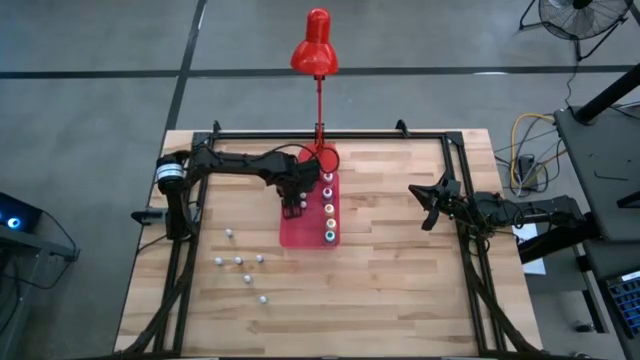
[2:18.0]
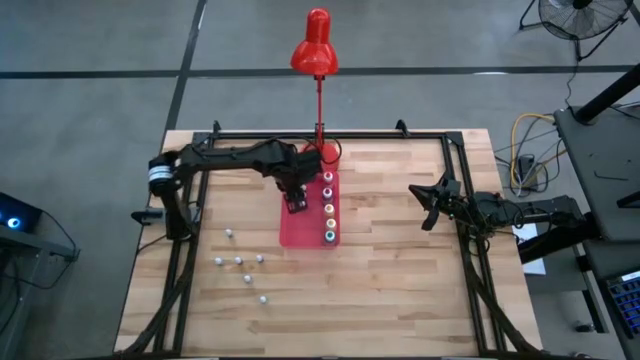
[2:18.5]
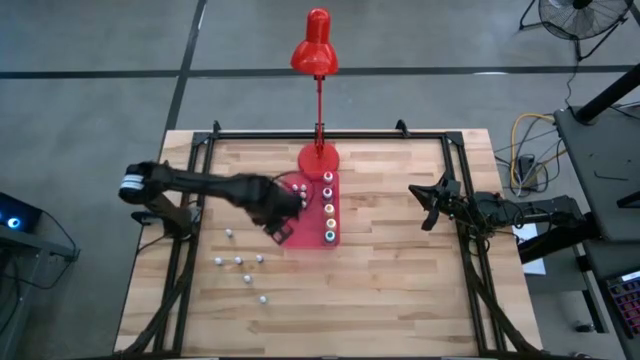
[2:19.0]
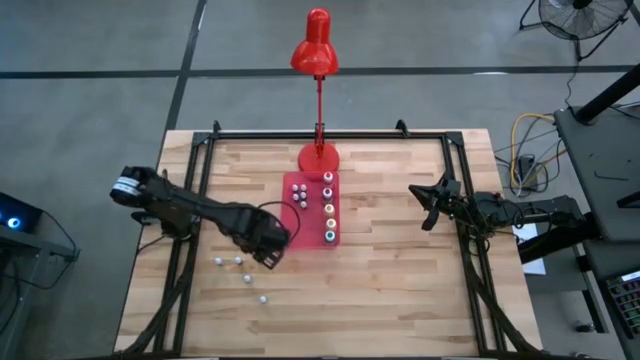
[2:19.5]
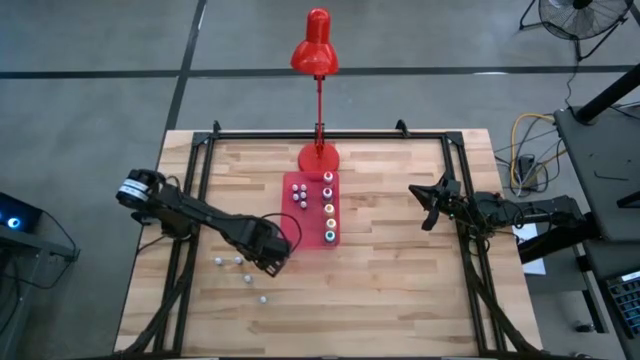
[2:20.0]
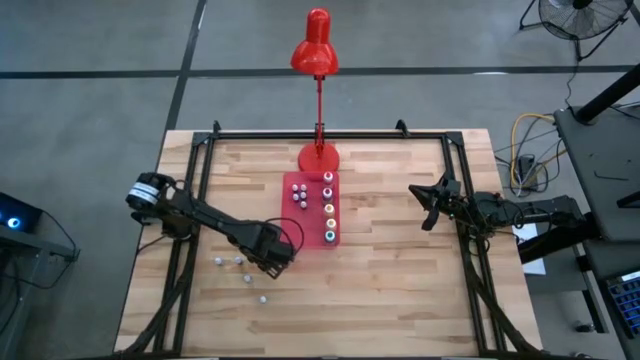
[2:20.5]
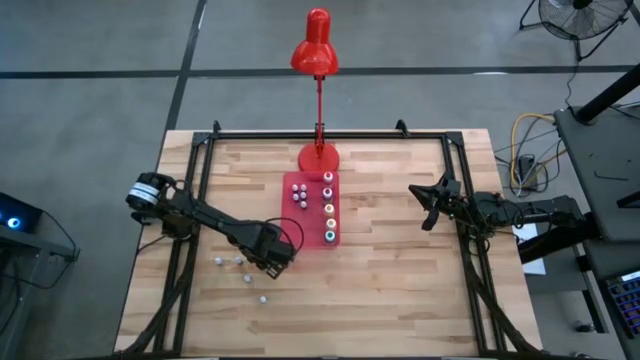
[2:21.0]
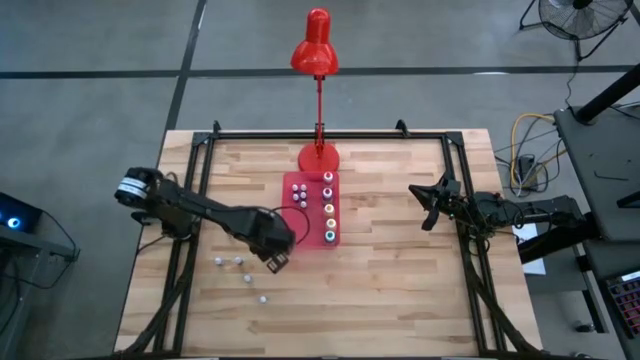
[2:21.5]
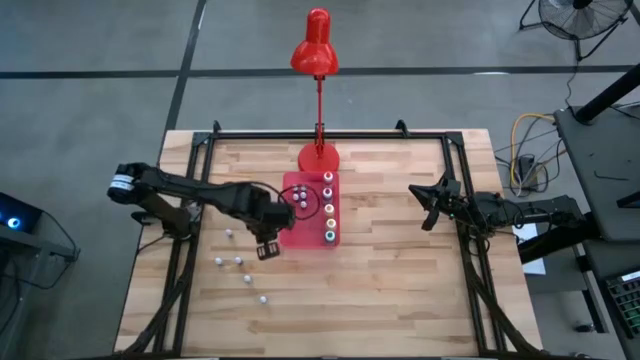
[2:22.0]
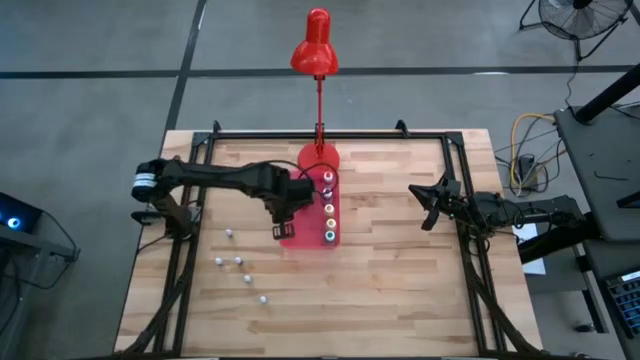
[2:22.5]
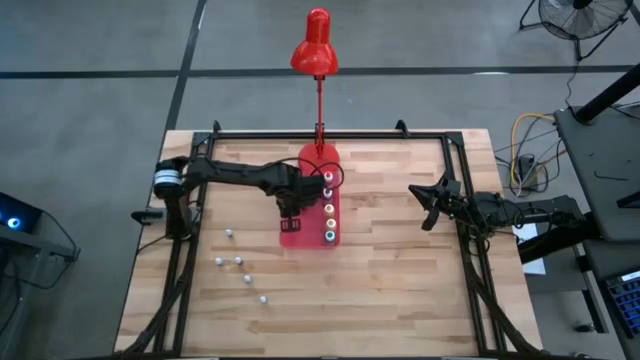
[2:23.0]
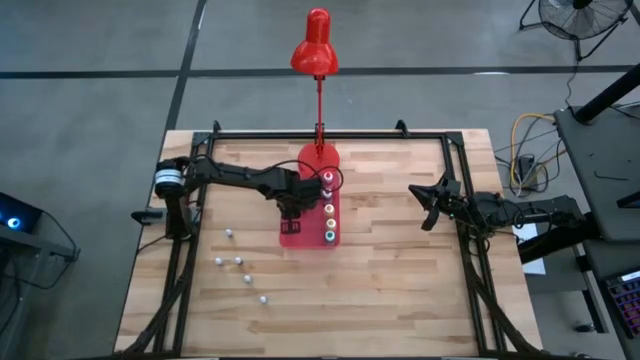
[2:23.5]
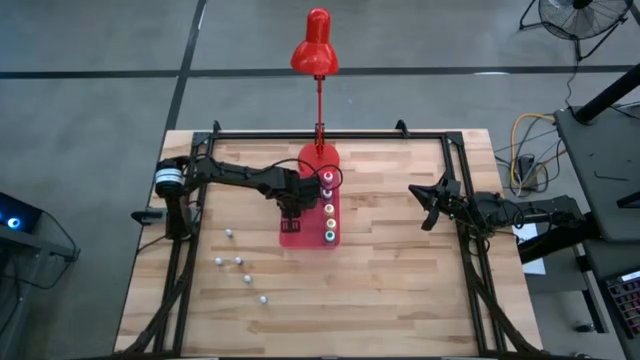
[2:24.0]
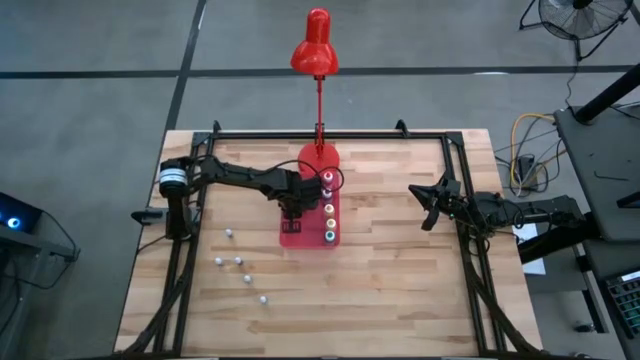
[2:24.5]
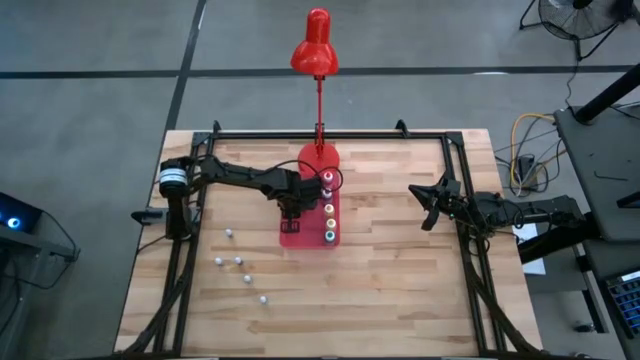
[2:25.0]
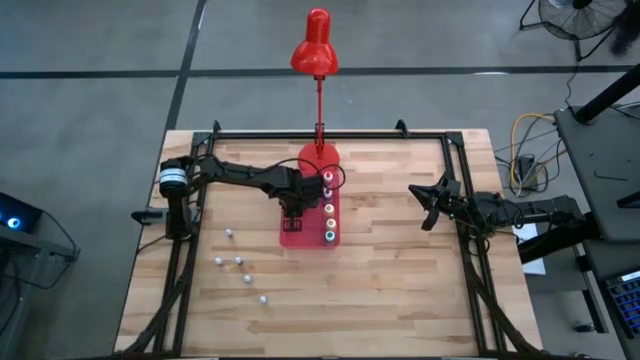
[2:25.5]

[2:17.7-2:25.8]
Task: Pick & Place food coloring
Put the small red food coloring bottle into the pink bin

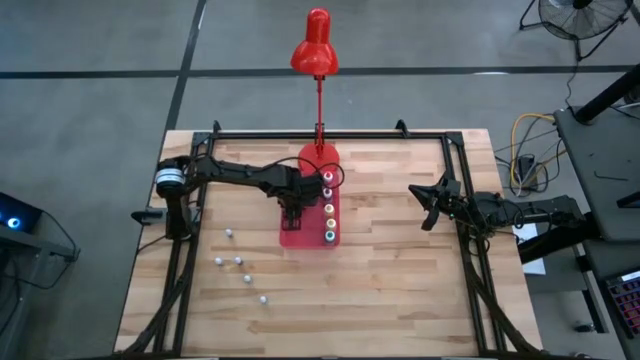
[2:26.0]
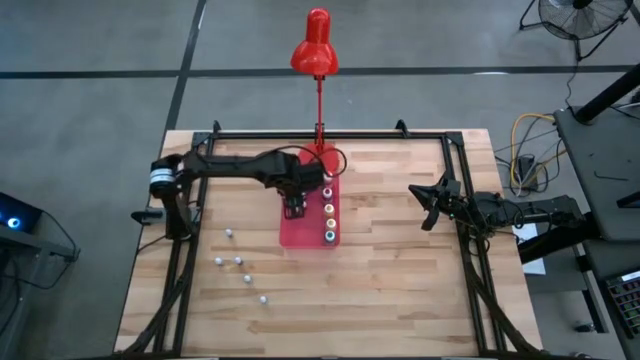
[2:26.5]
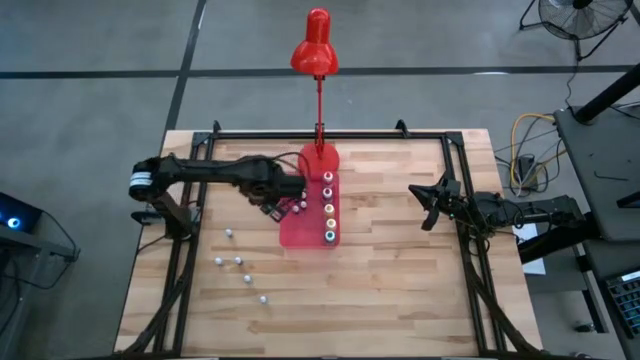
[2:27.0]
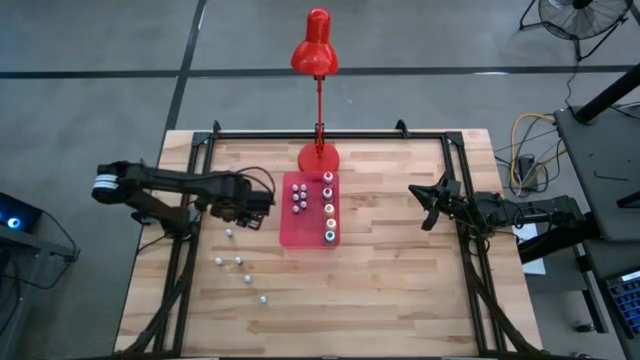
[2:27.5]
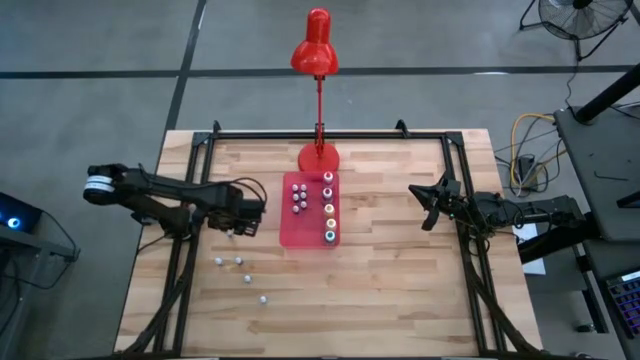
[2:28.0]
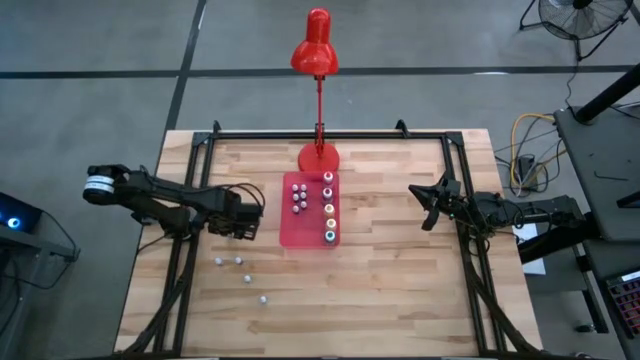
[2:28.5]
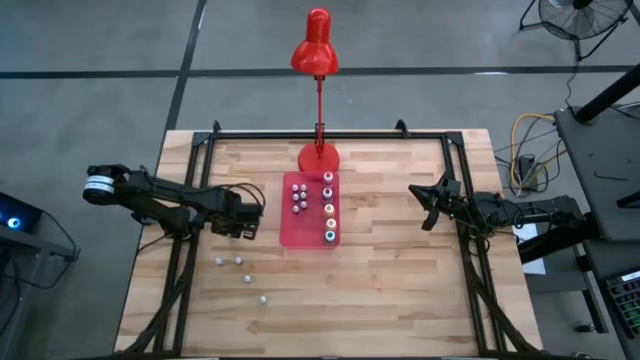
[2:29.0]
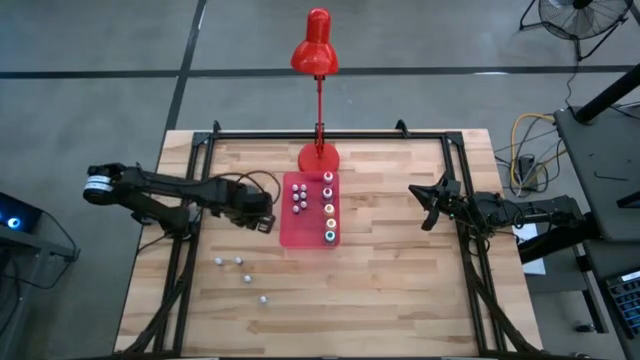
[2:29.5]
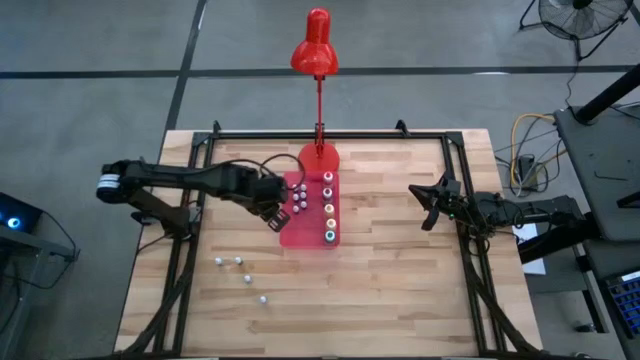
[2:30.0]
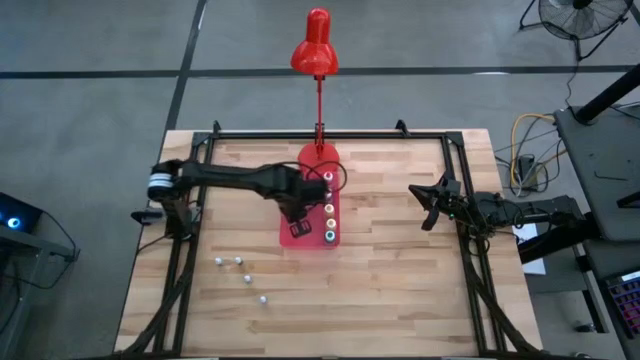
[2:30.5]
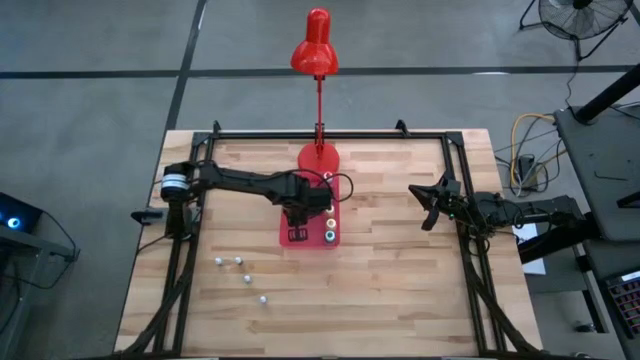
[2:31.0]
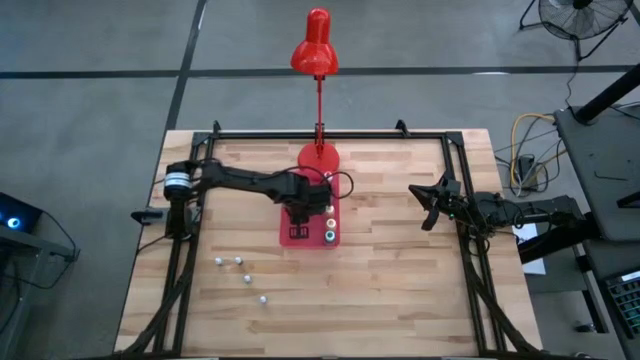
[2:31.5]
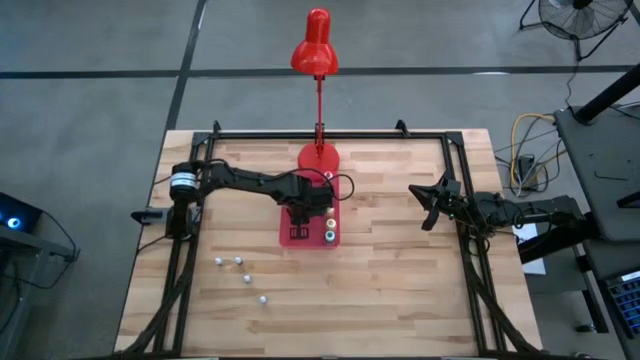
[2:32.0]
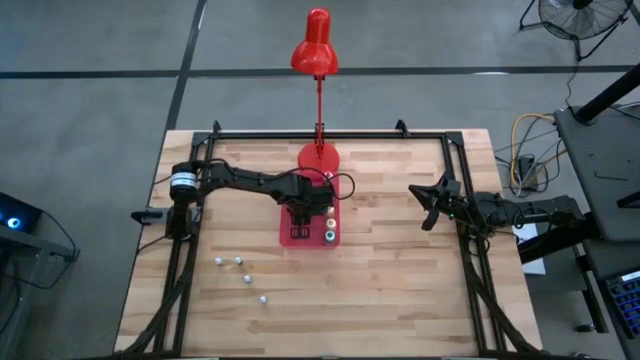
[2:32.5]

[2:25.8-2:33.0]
Put the small black food coloring bottle into the pink bin

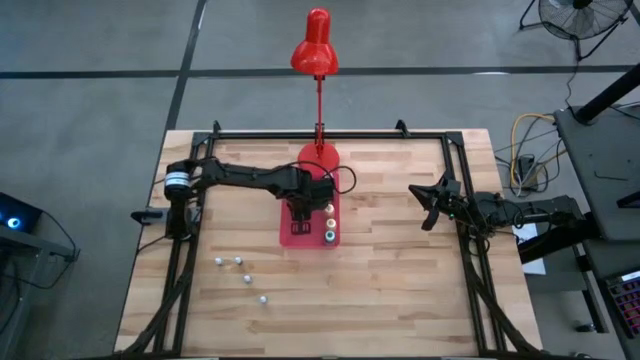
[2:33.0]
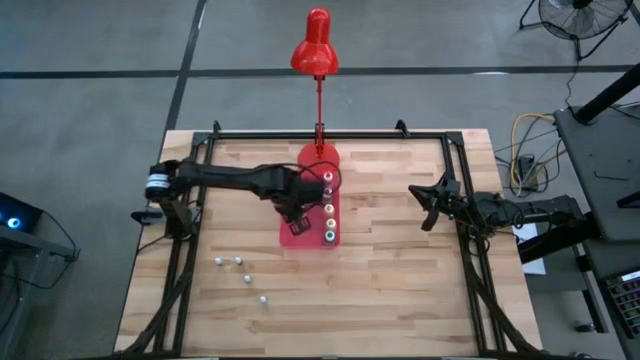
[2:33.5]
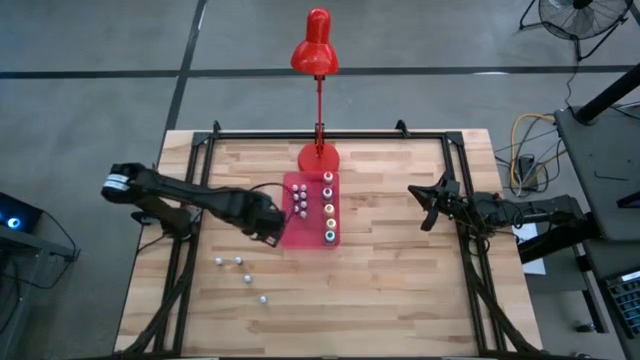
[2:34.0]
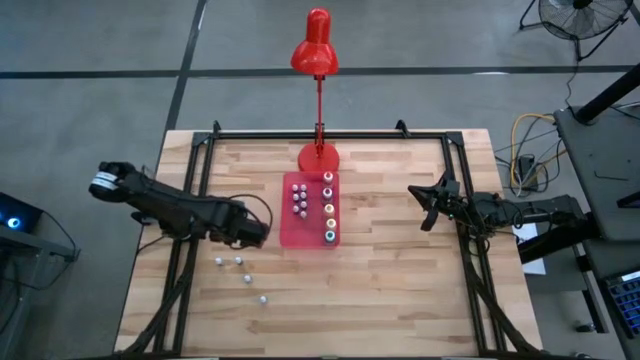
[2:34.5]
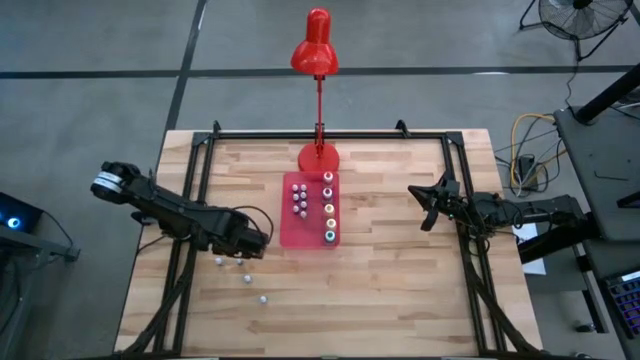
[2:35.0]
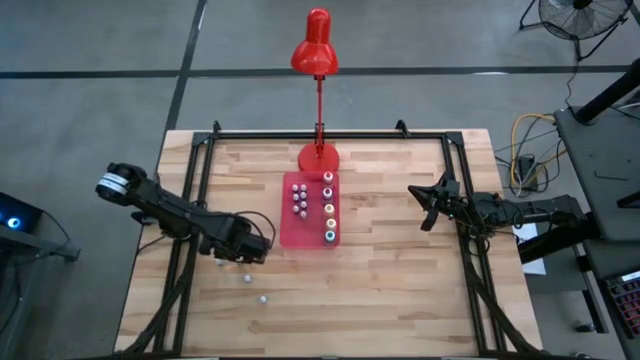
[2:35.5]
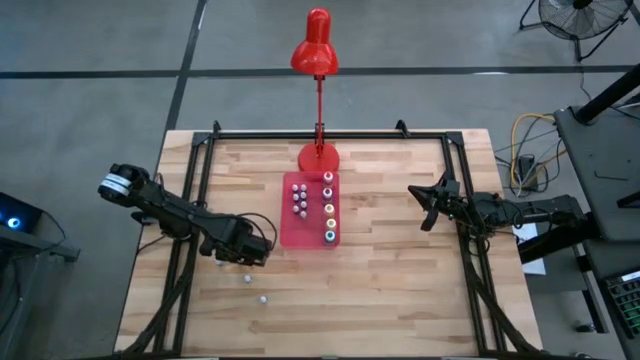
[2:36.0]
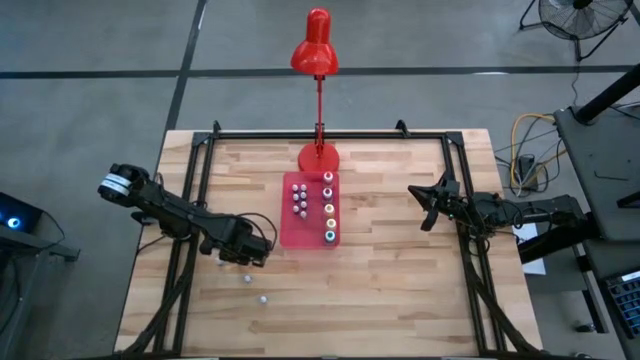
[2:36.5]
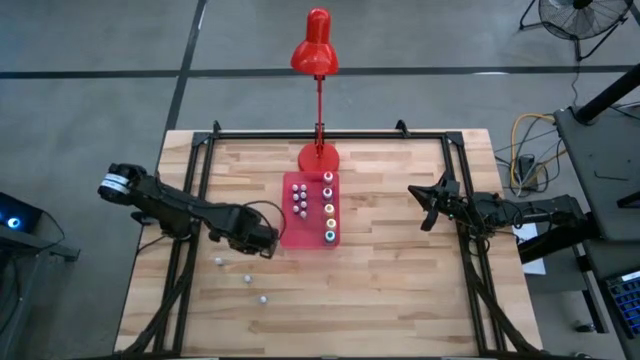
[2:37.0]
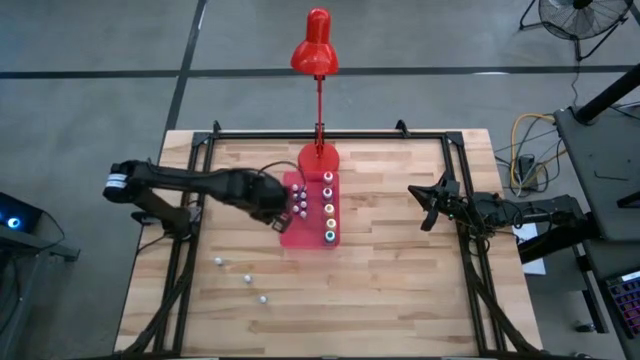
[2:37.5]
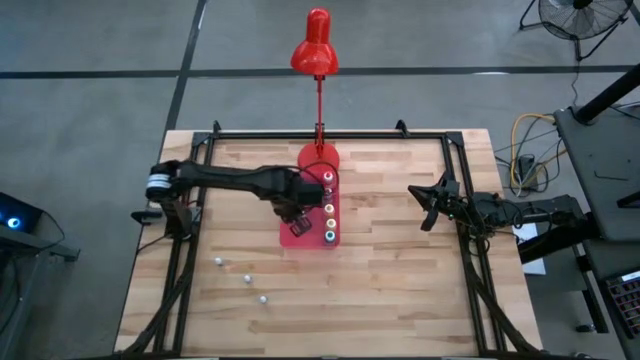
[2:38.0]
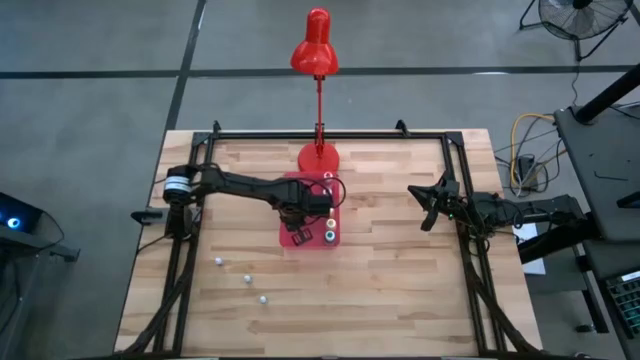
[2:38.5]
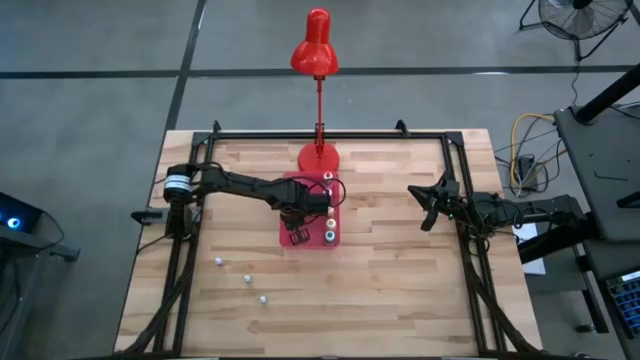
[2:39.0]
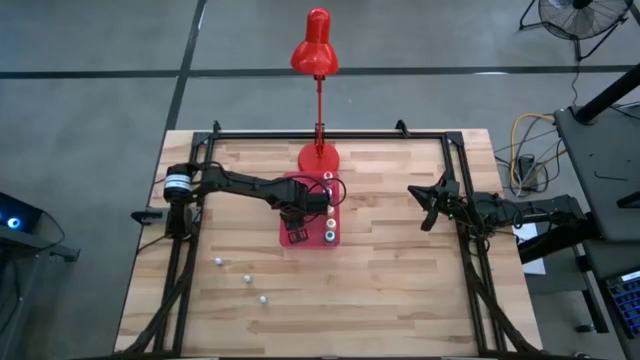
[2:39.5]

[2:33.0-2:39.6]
Put the small blue food coloring bottle into the pink bin
